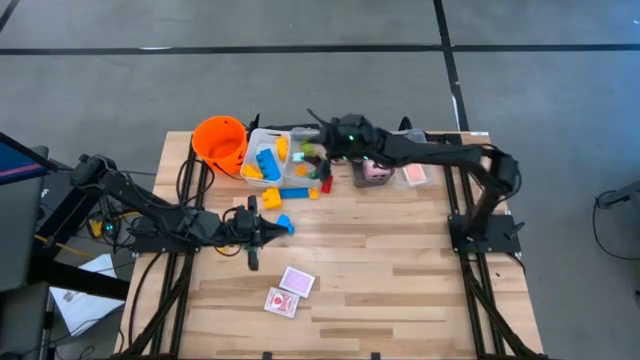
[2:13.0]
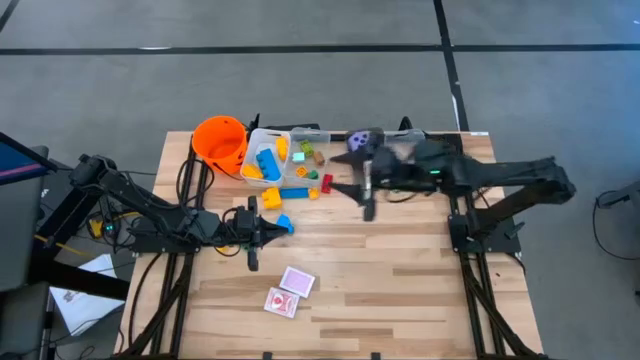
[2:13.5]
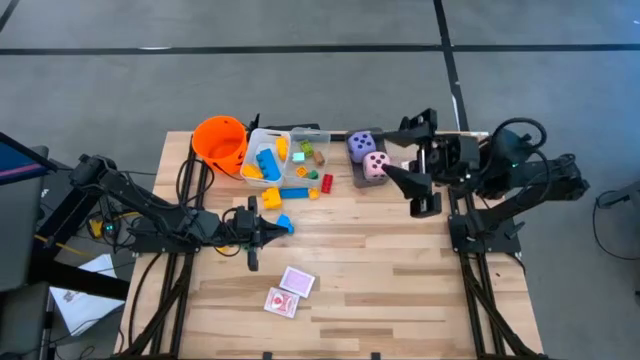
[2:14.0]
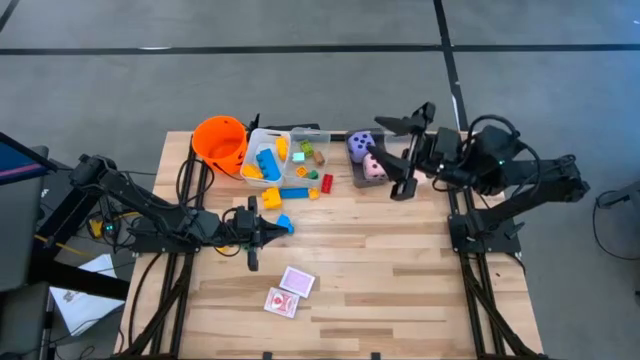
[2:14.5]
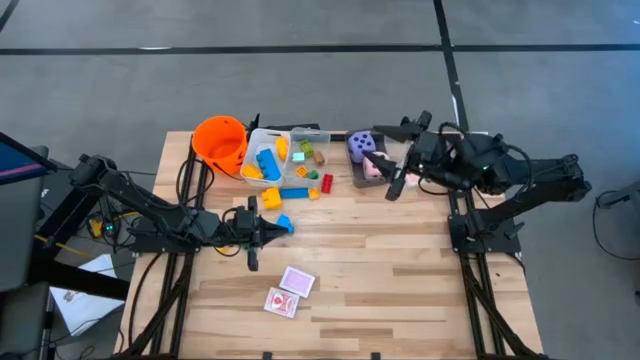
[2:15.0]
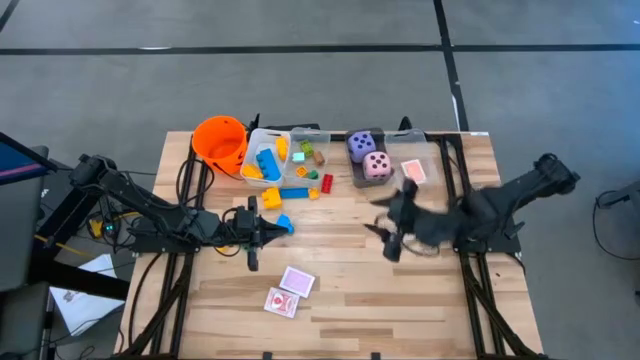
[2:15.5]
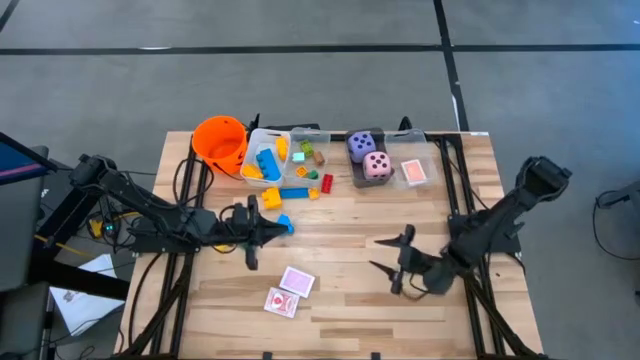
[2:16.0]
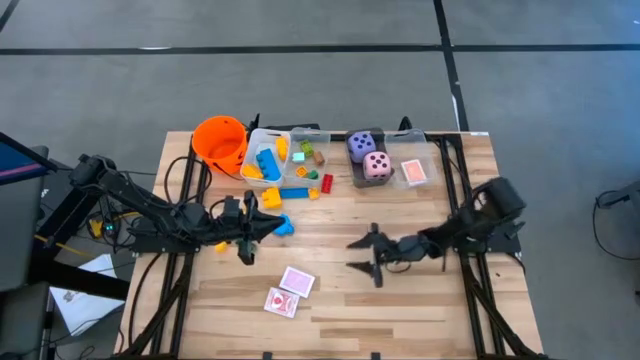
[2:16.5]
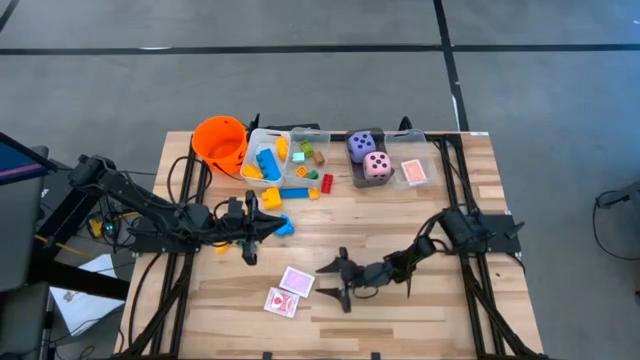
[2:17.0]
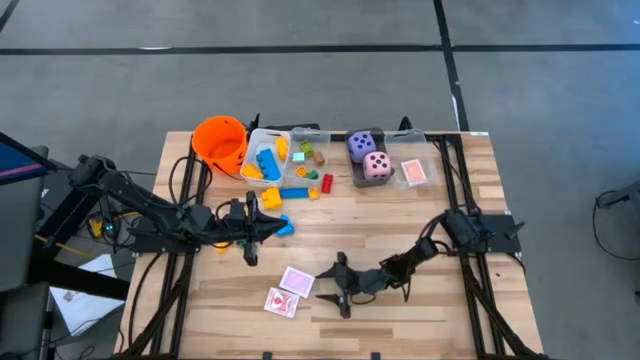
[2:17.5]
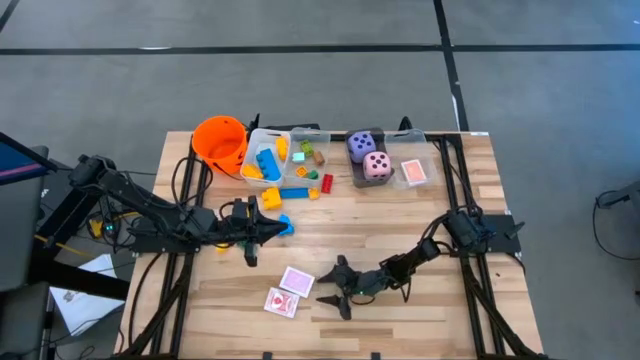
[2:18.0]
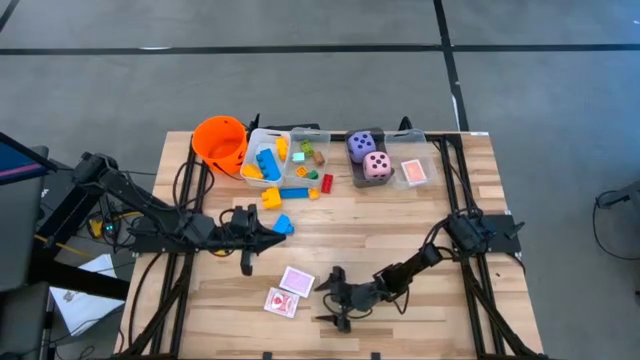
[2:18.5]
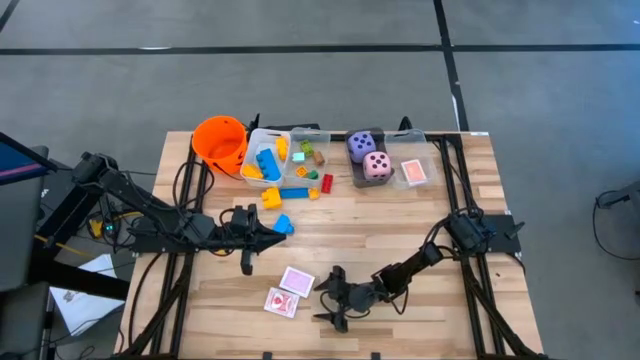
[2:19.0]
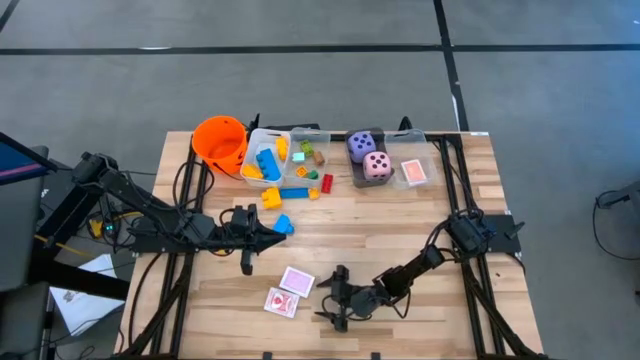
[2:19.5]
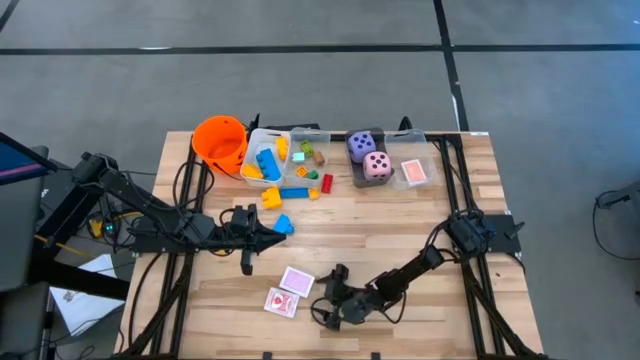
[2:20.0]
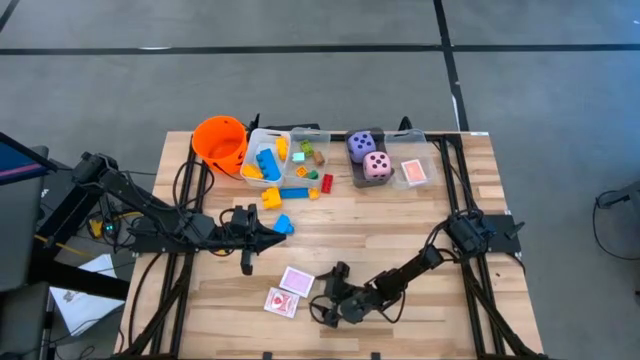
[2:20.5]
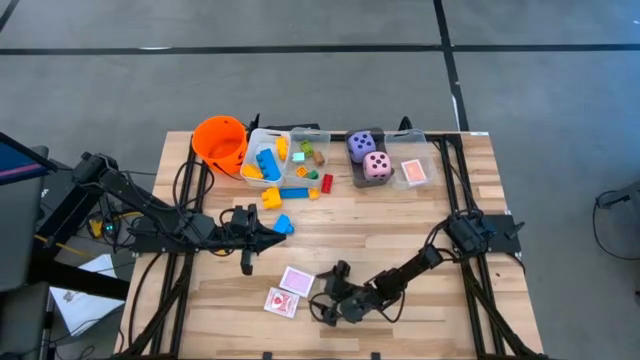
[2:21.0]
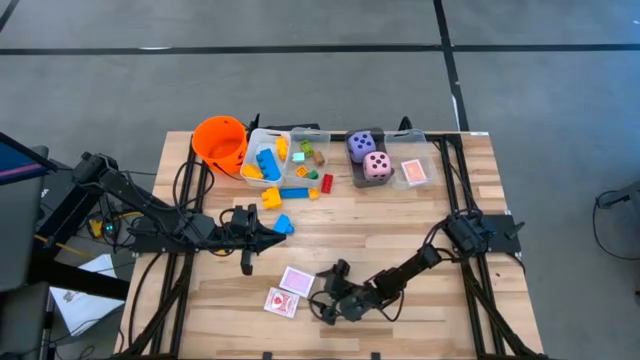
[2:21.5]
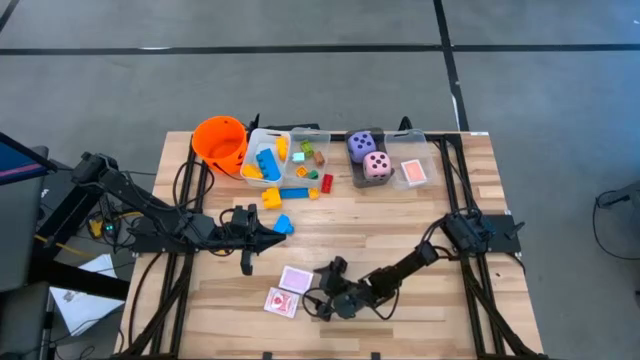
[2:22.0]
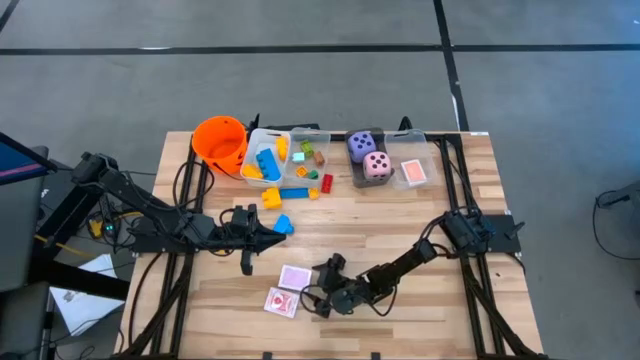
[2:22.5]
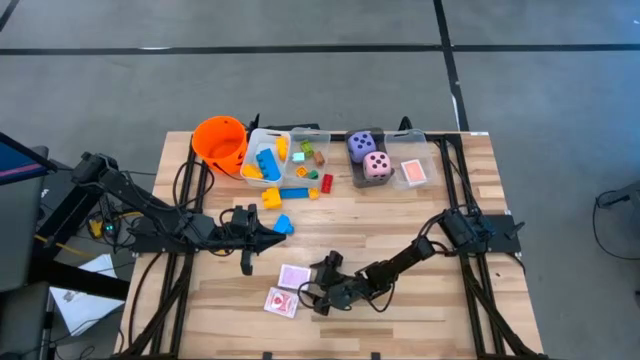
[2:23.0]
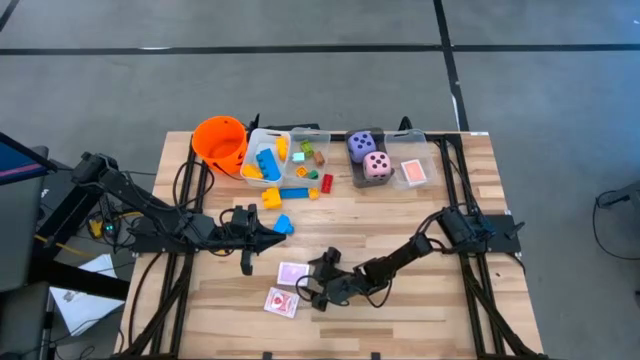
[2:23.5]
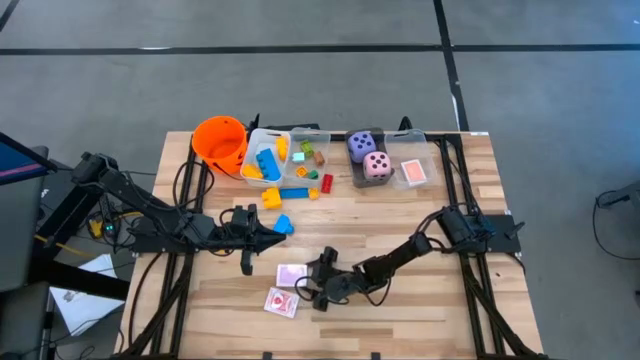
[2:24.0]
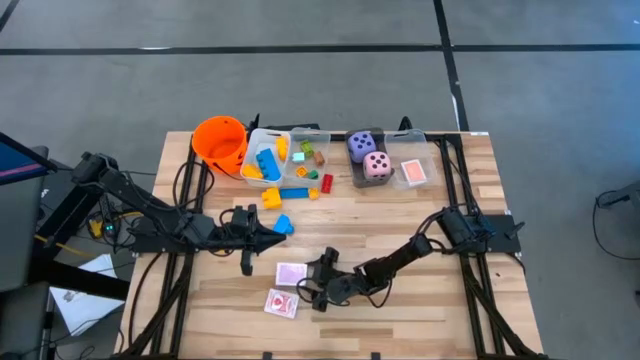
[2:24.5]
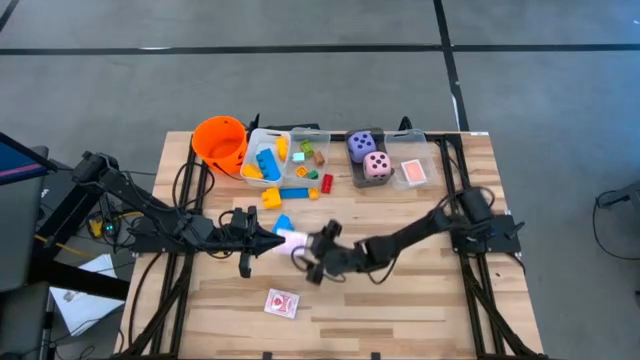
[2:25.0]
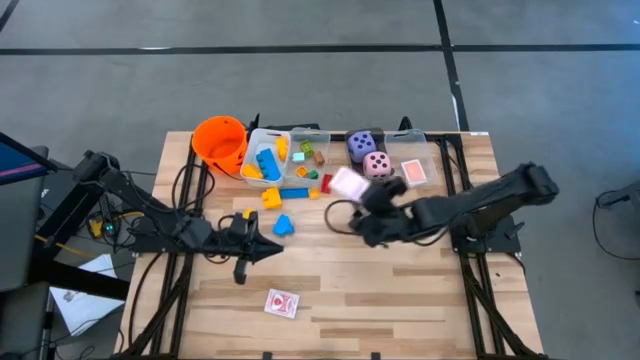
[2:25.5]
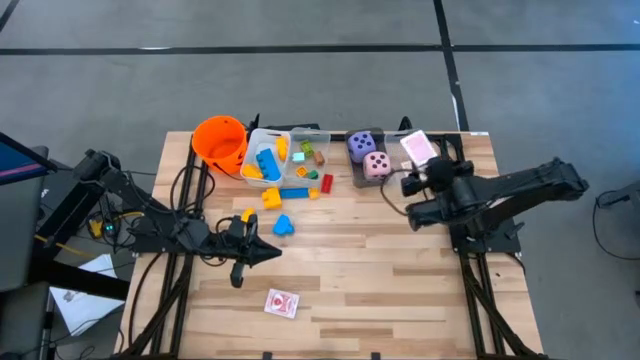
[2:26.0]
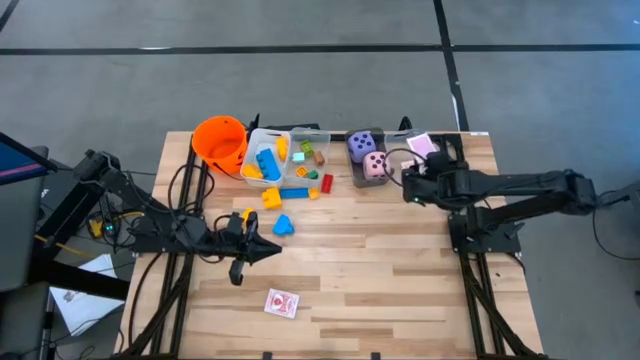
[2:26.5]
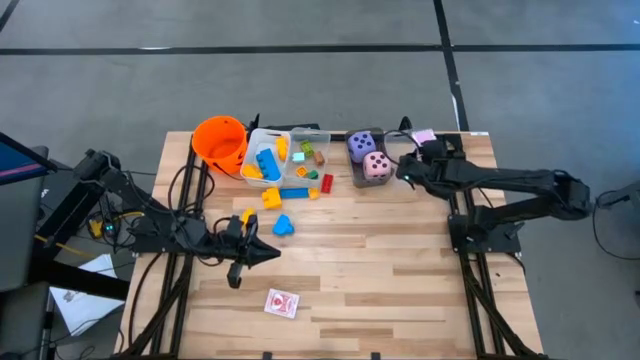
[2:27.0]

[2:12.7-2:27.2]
Task: Pick & Place Toys
Put the pink deck of cards into the right transparent bin

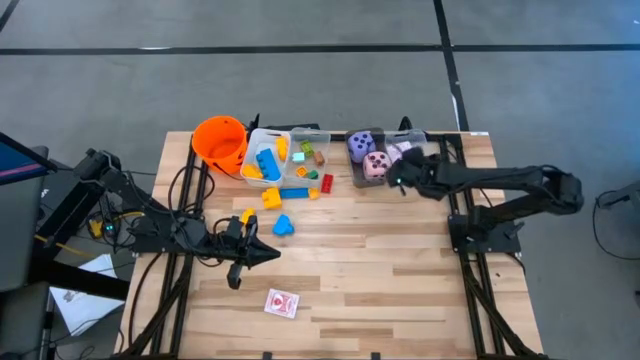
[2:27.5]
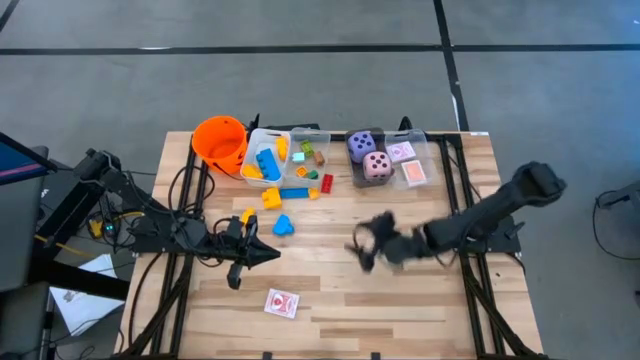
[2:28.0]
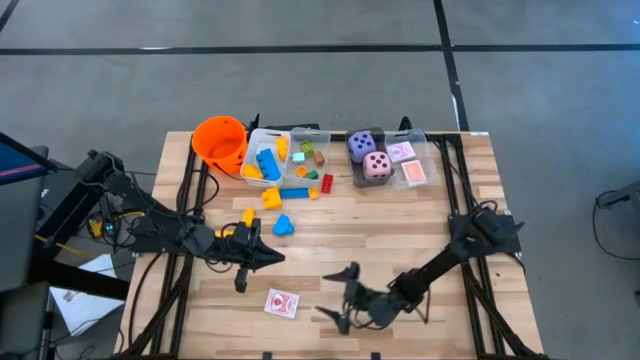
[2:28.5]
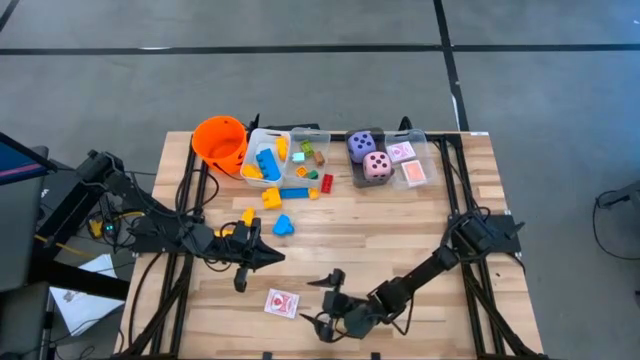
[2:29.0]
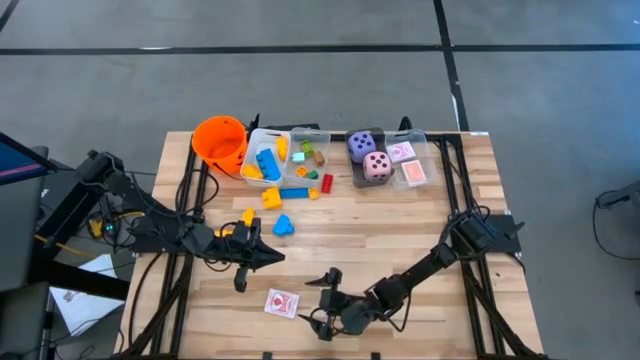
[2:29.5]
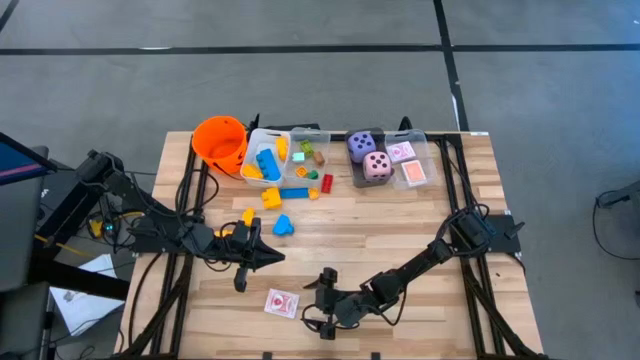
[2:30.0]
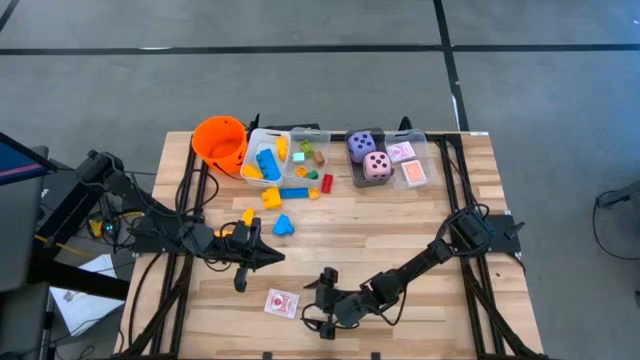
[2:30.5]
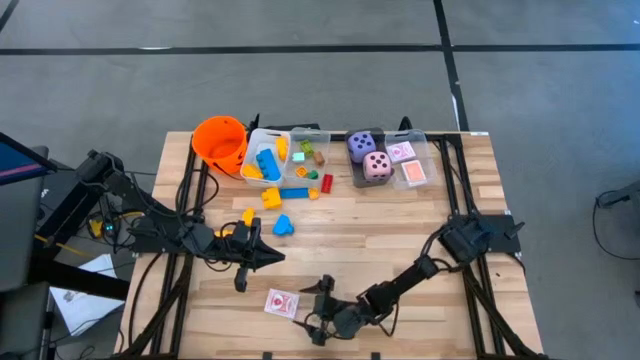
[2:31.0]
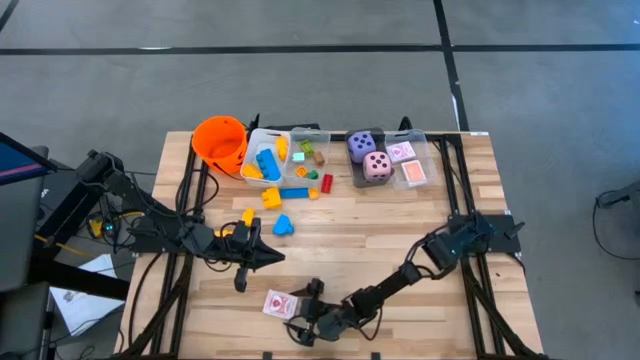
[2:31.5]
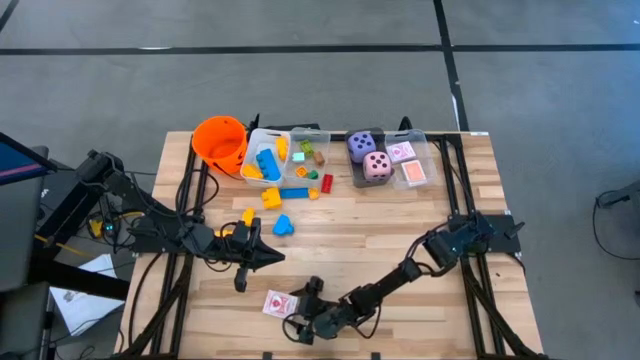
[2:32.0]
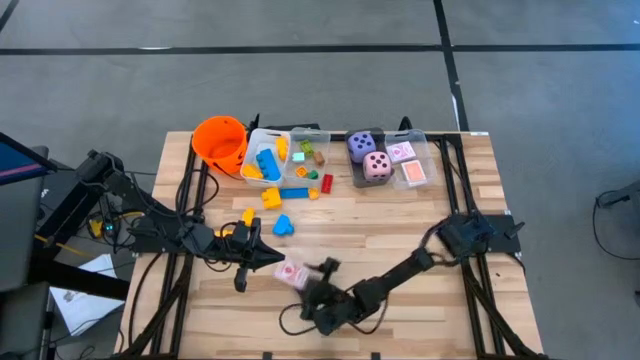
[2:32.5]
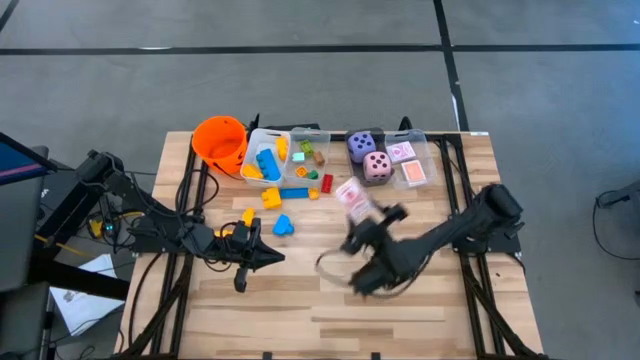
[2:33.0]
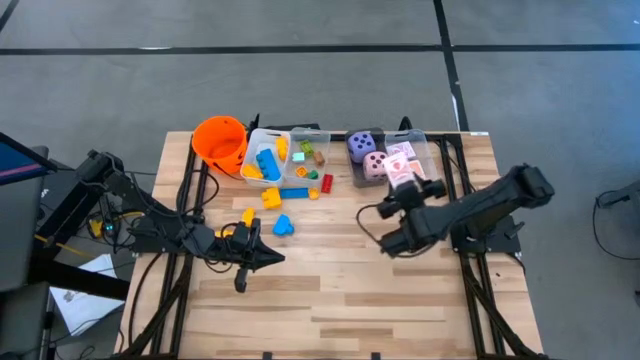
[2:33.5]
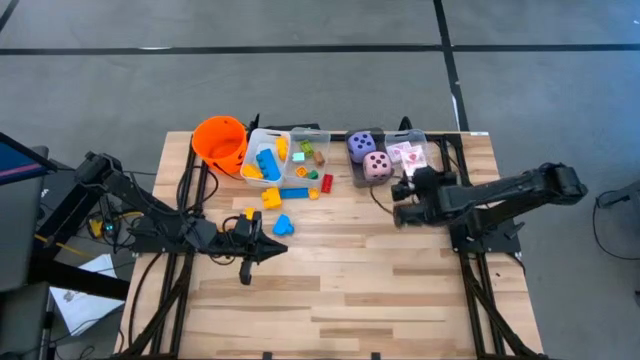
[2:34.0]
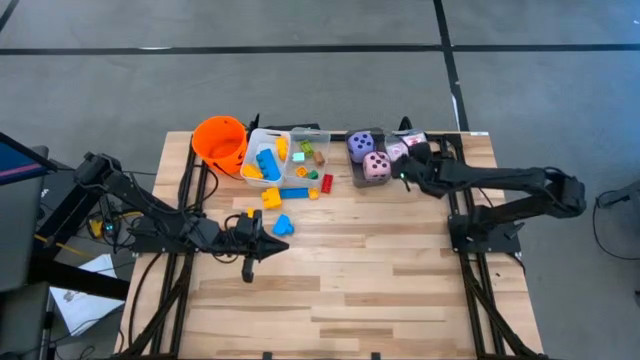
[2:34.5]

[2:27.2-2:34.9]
Put the red deck of cards into the right transparent bin

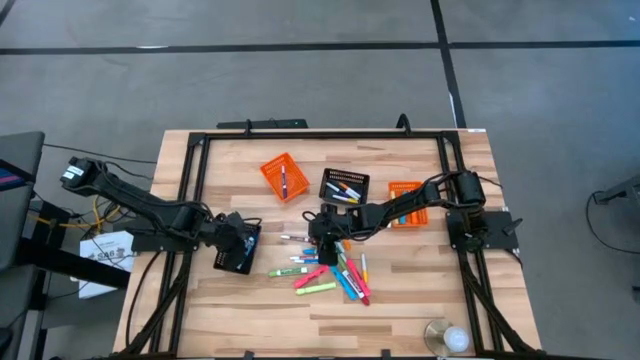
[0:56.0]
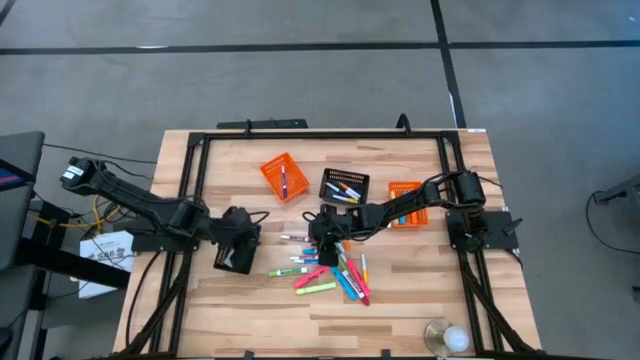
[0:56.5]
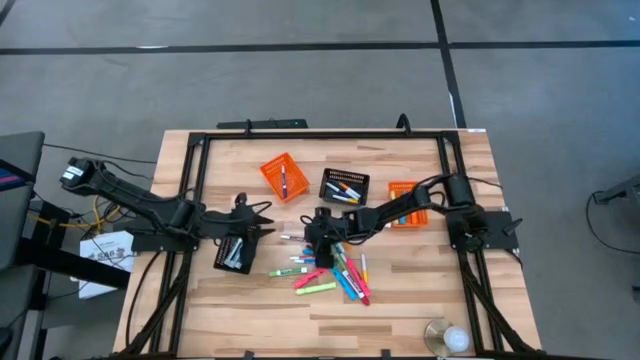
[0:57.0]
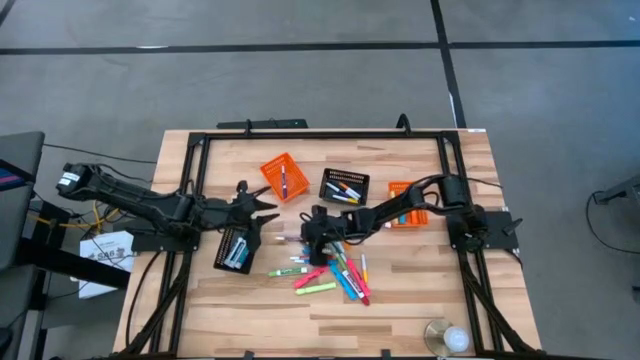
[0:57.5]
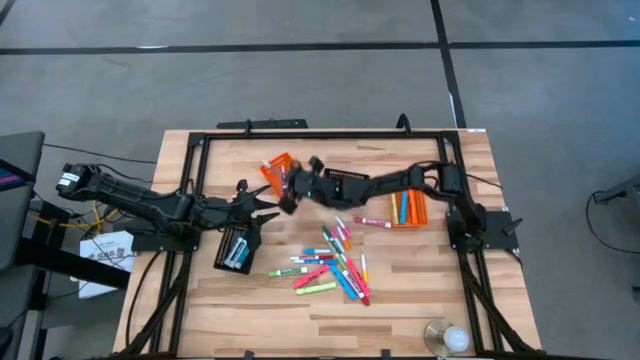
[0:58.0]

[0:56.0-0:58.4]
Task: Pick & Place Markers
Put the violet marker into the left orange bin
